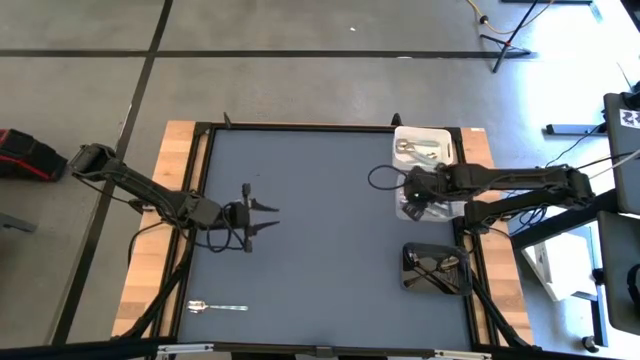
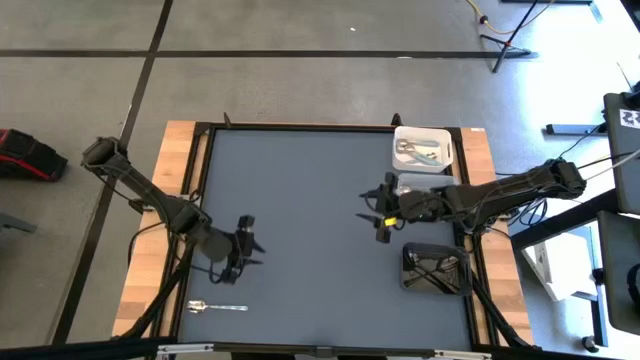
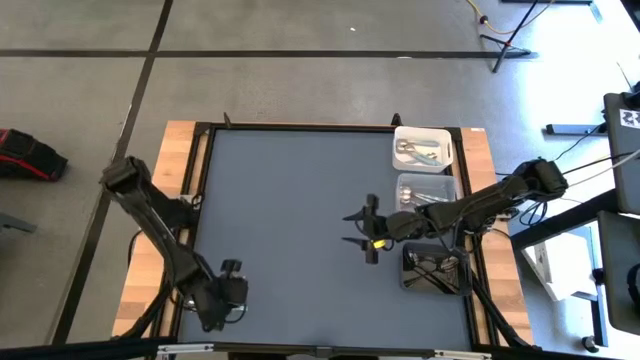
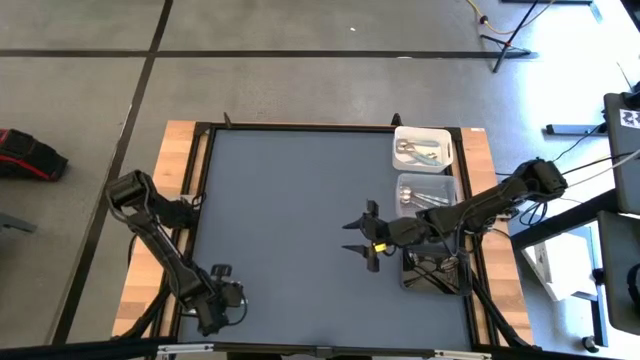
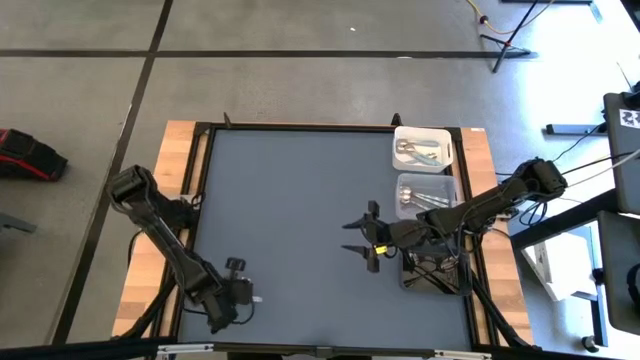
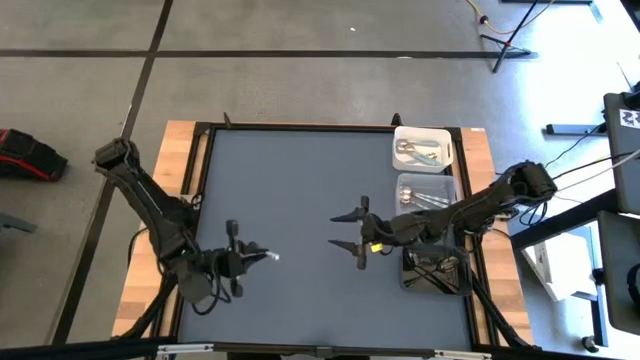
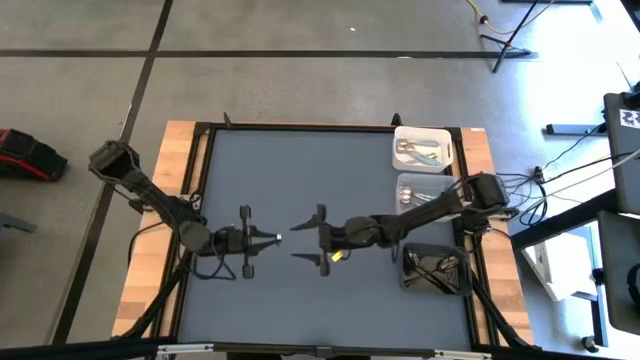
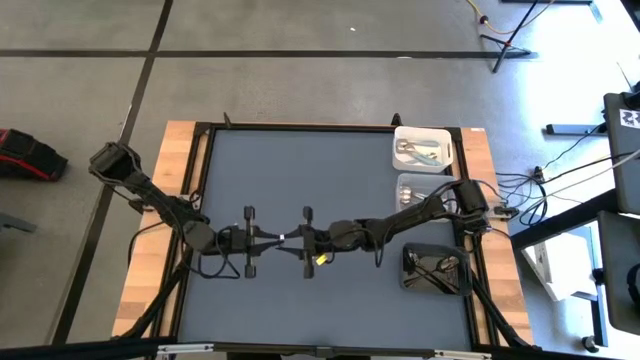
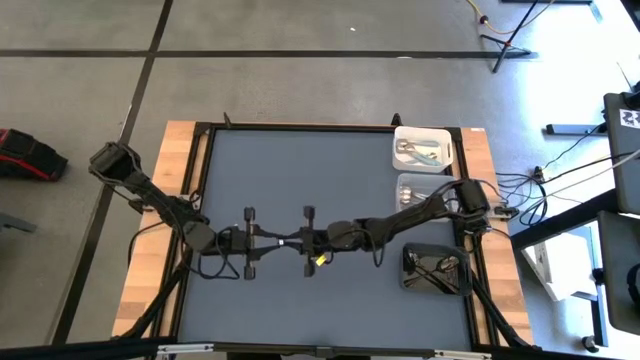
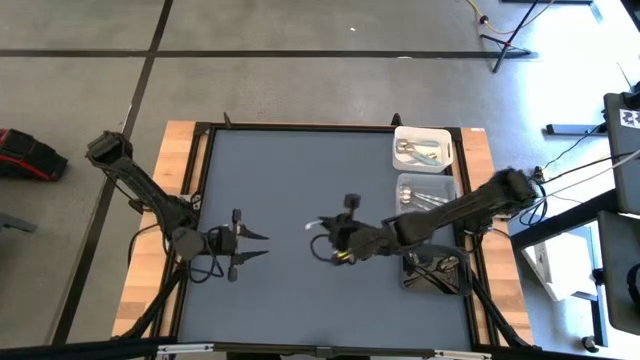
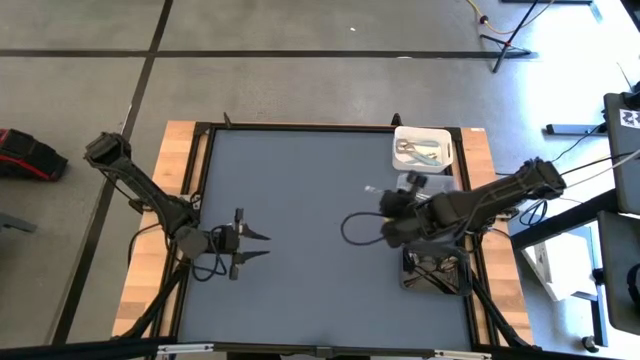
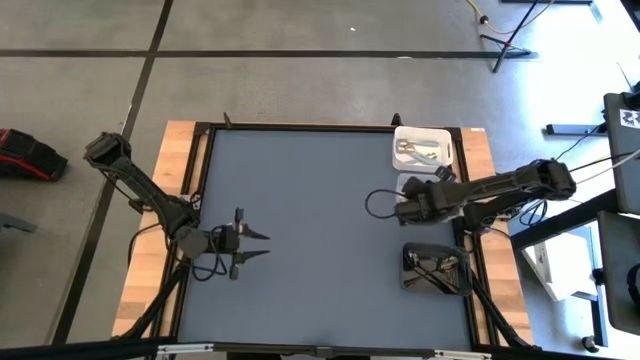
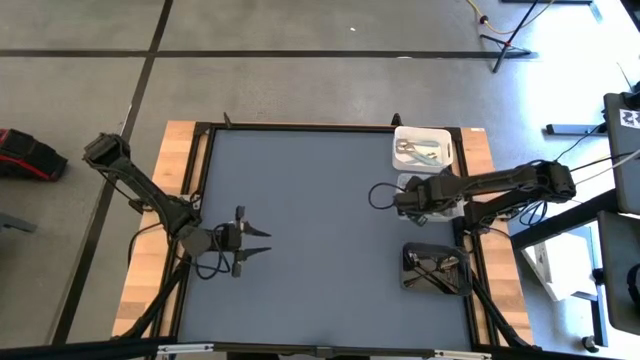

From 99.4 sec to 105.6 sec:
Task: Sort silverware by color (type)
Put the white green spoon into the transparent bin

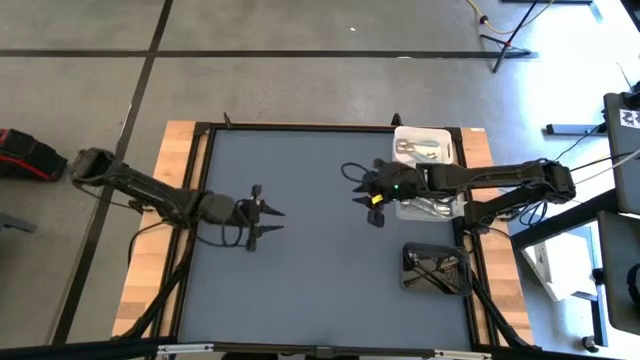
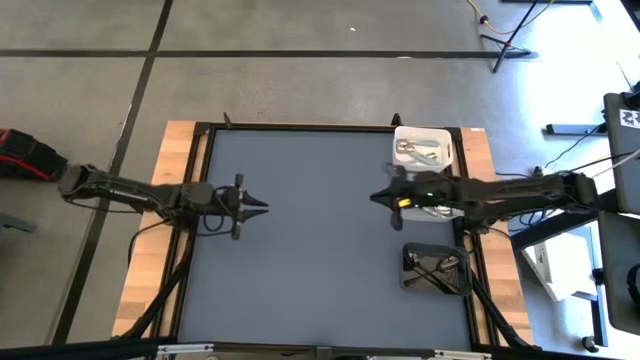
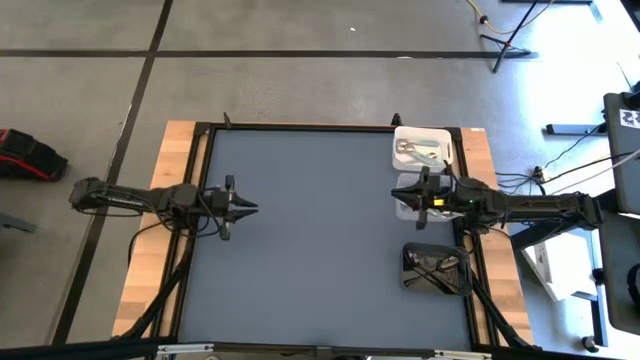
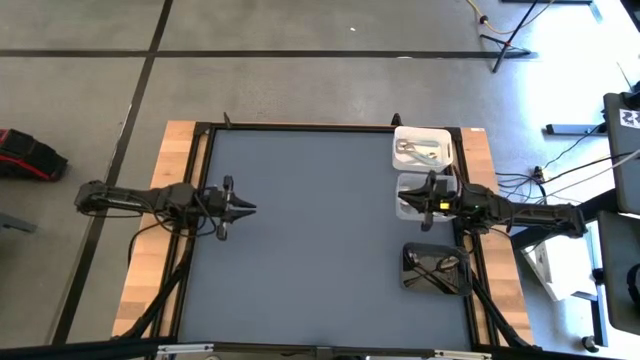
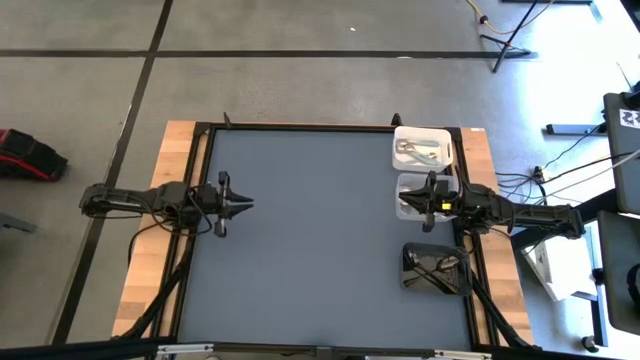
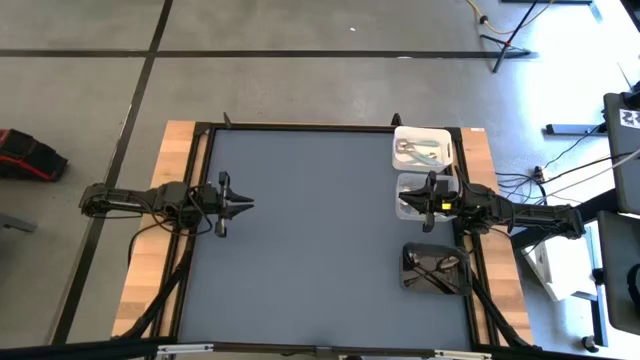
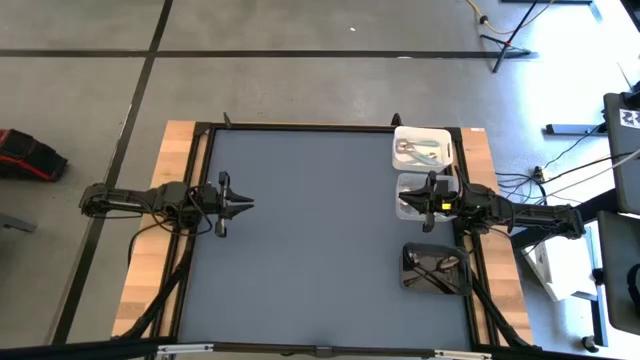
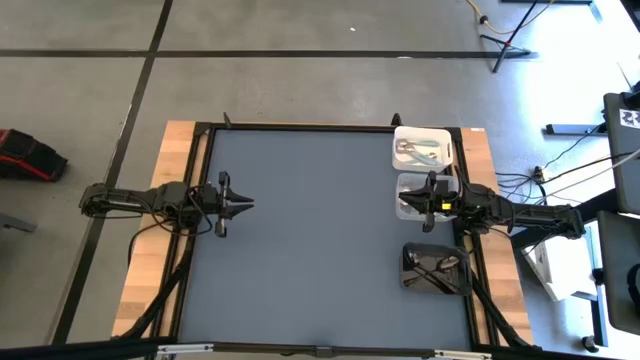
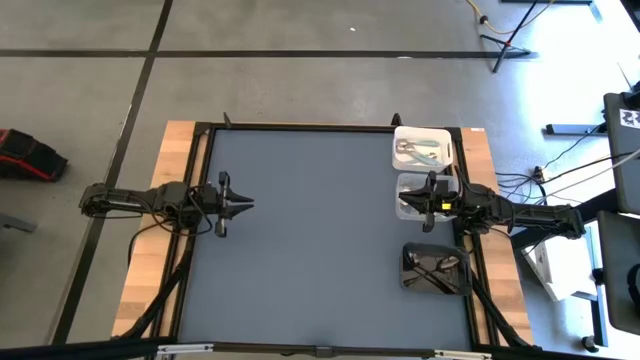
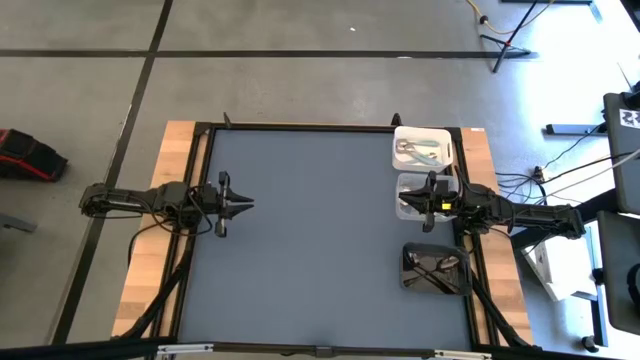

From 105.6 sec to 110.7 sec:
Return to Home Position

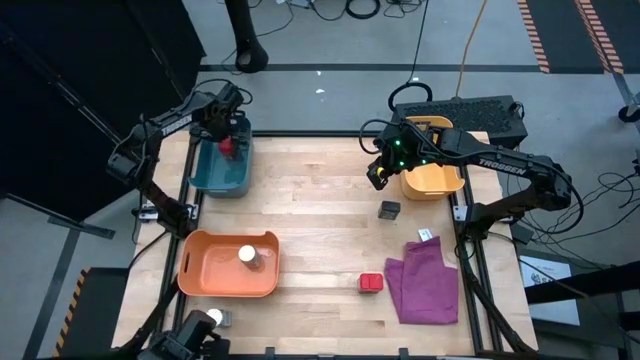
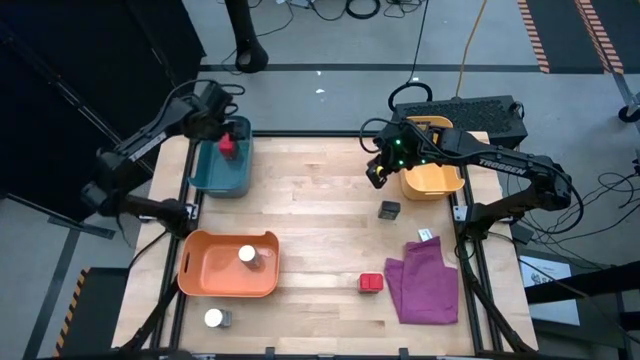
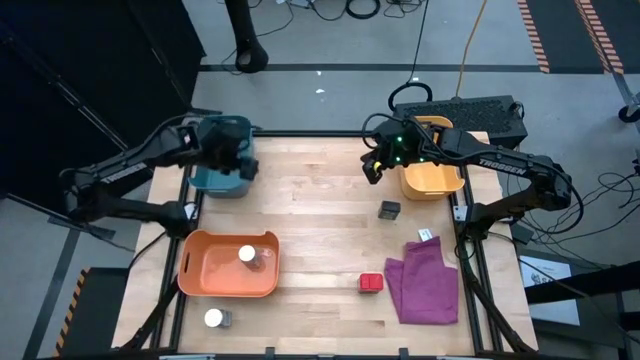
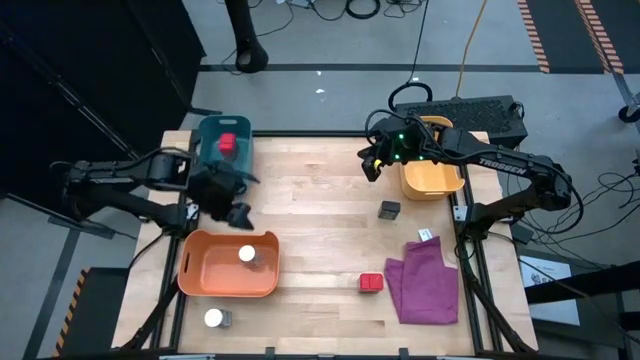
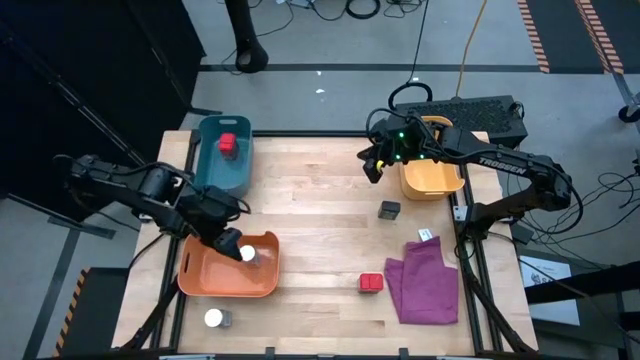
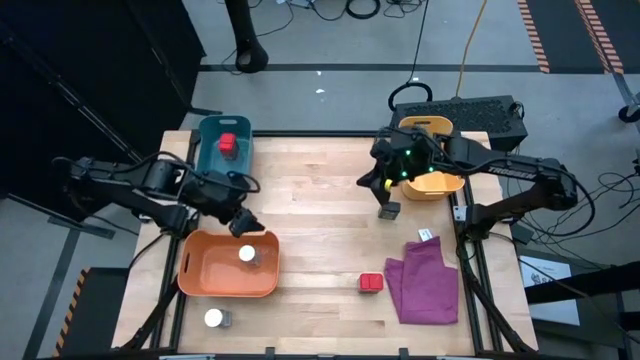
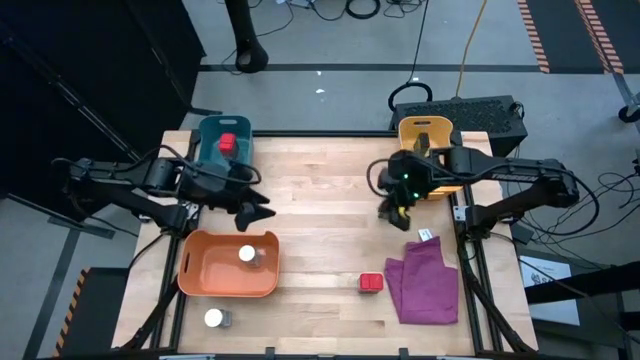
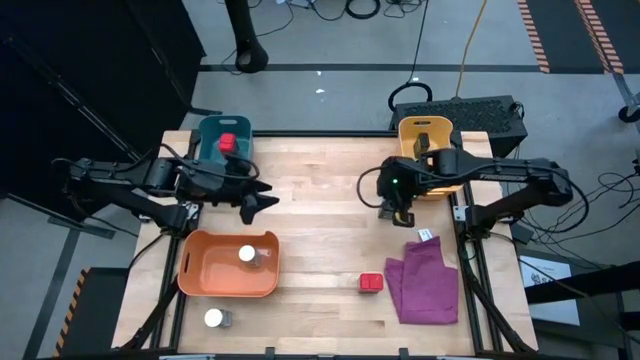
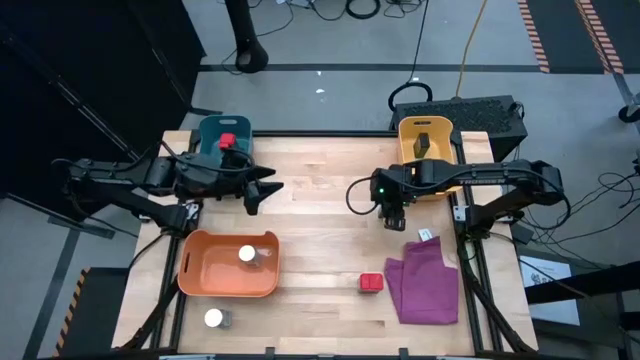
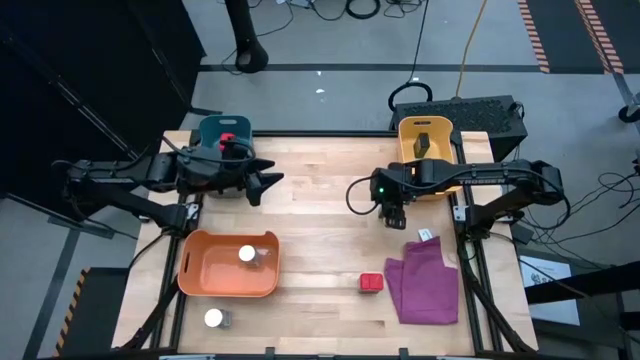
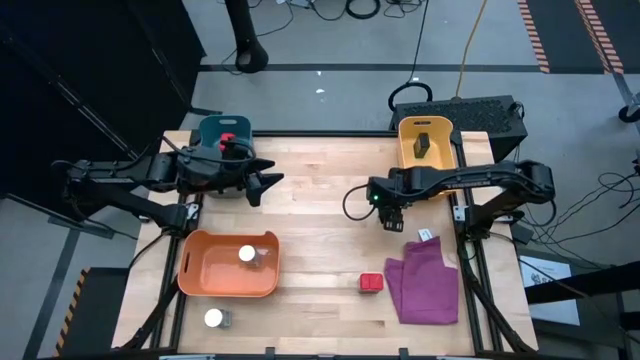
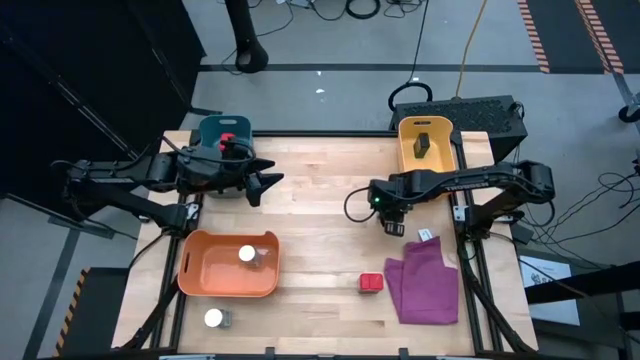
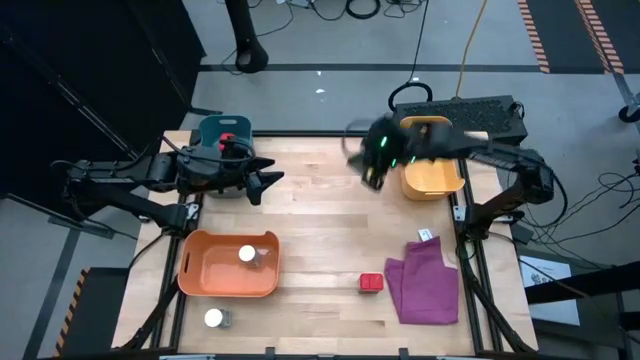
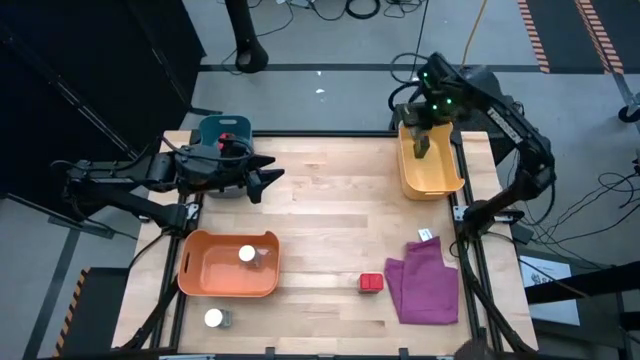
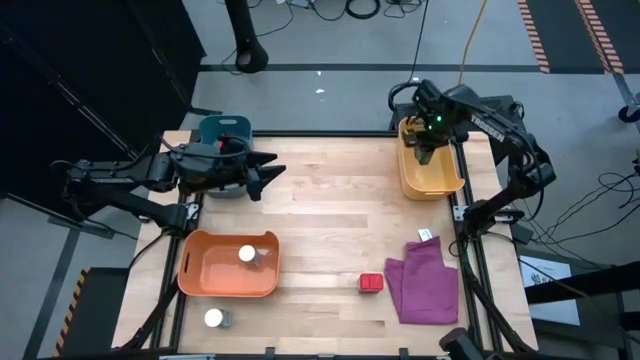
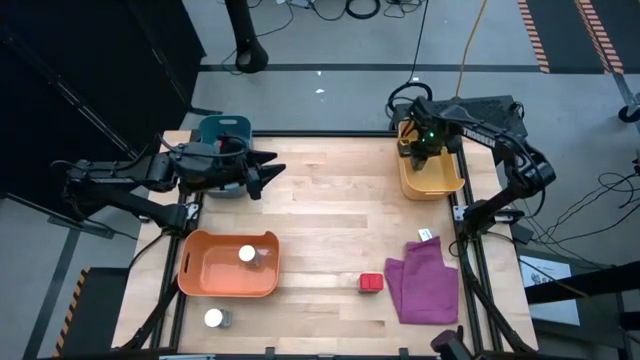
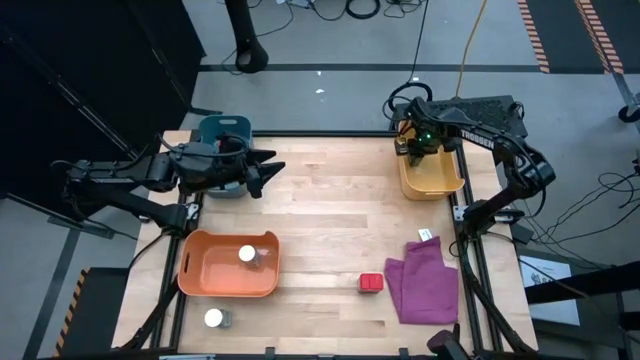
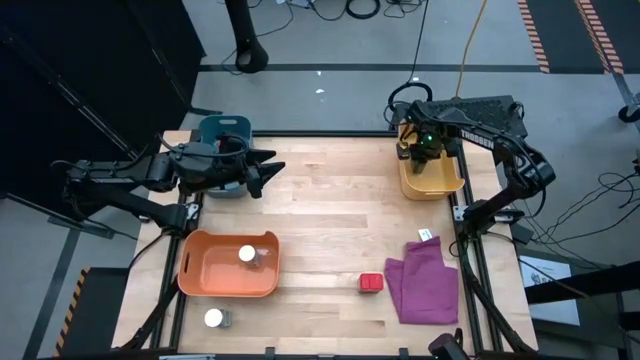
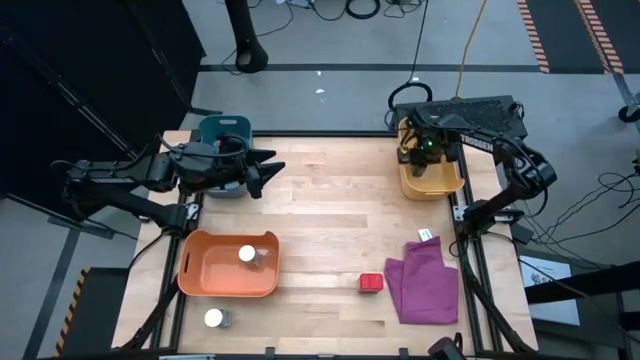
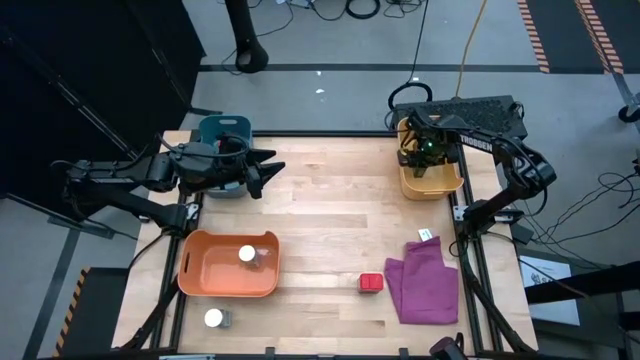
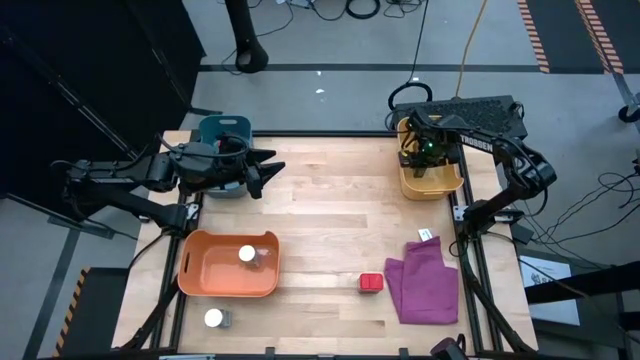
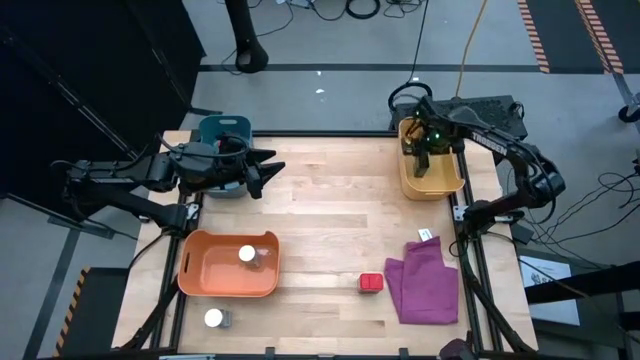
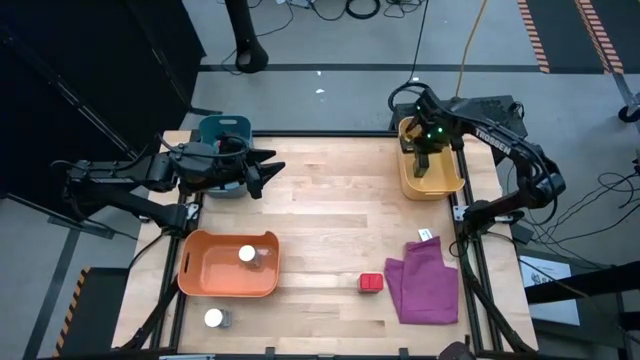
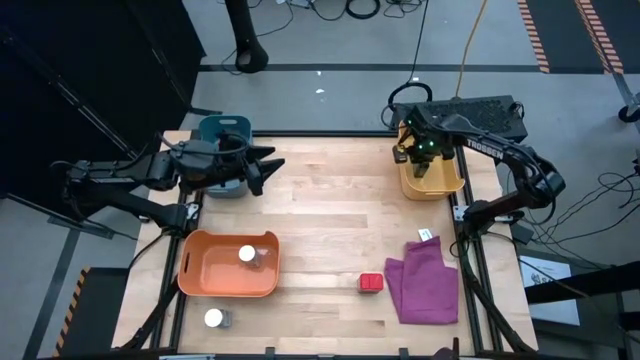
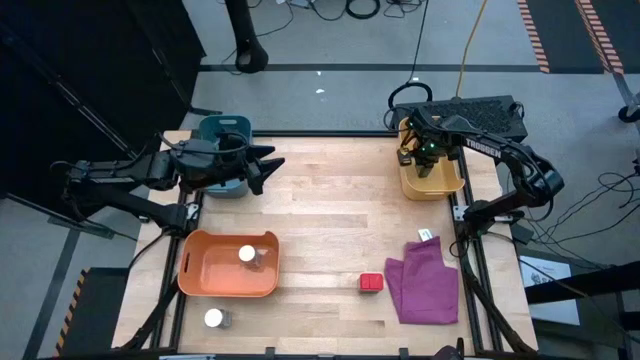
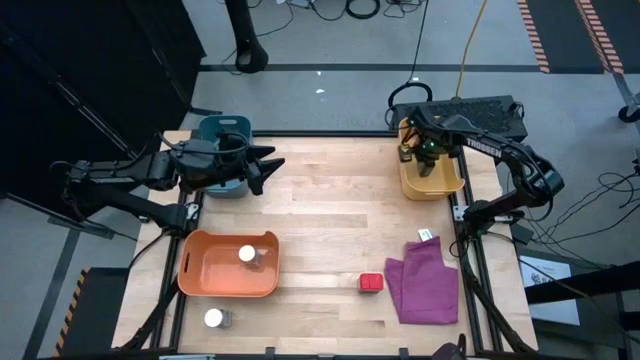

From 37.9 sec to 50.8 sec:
Task: Sort spices by type
Put the black seasoning can into the yellow bin
